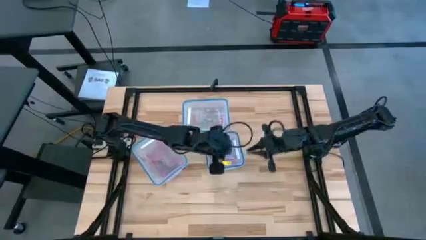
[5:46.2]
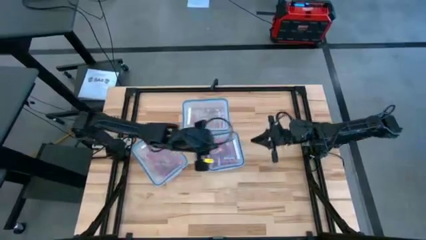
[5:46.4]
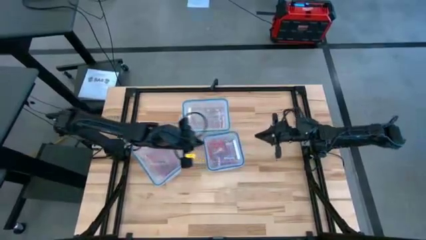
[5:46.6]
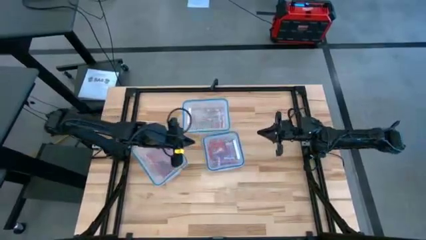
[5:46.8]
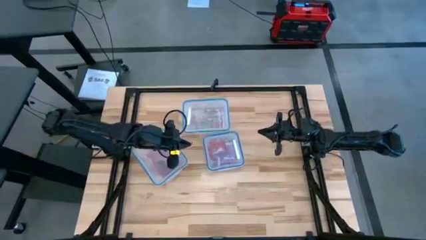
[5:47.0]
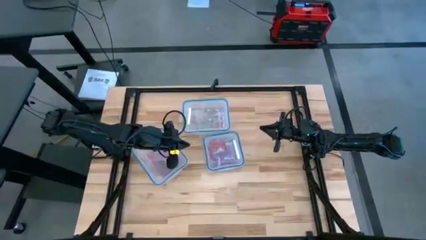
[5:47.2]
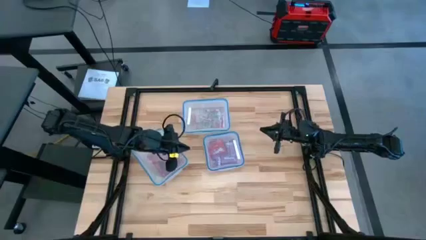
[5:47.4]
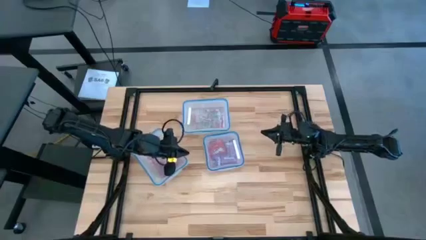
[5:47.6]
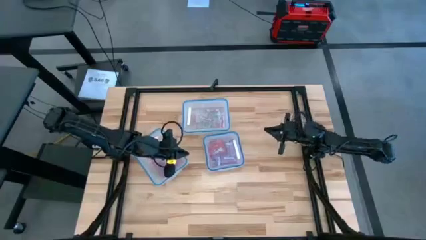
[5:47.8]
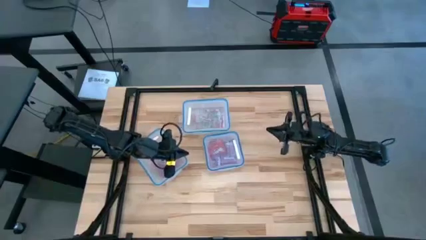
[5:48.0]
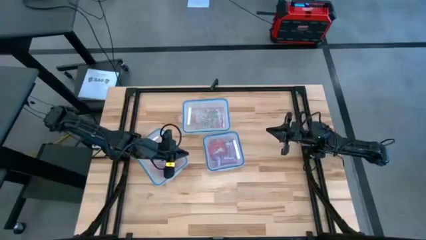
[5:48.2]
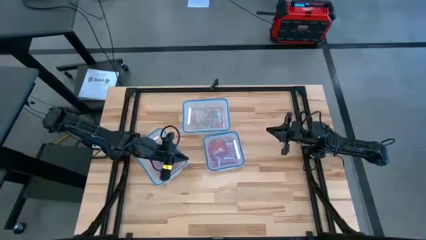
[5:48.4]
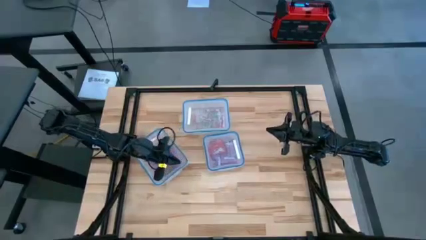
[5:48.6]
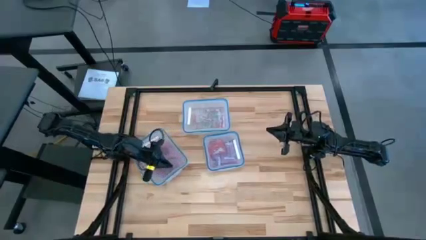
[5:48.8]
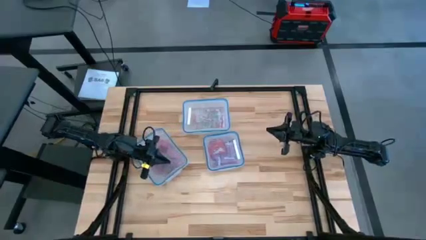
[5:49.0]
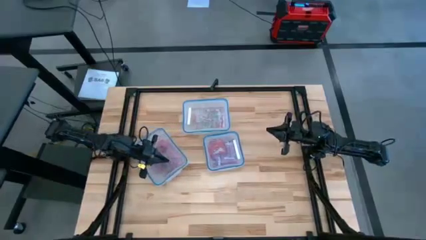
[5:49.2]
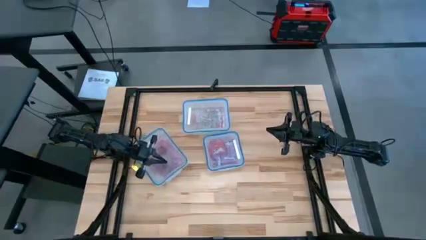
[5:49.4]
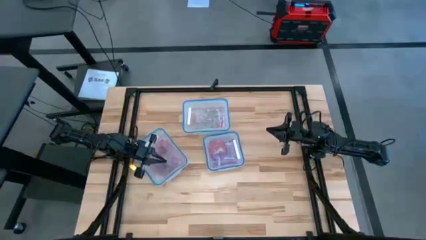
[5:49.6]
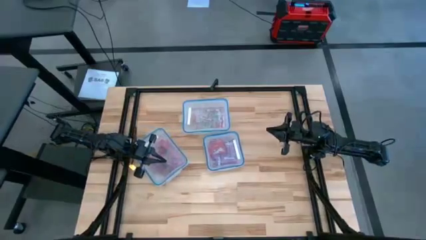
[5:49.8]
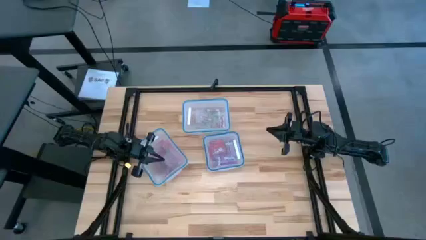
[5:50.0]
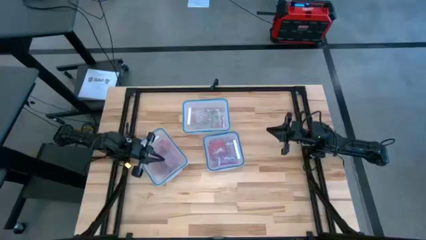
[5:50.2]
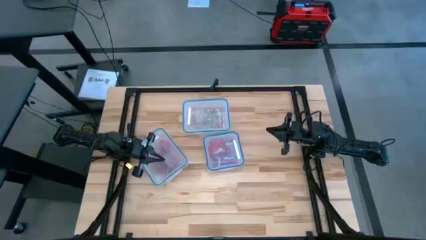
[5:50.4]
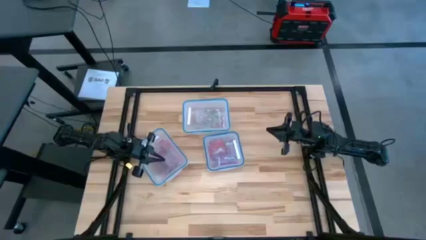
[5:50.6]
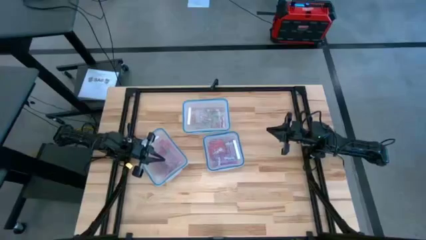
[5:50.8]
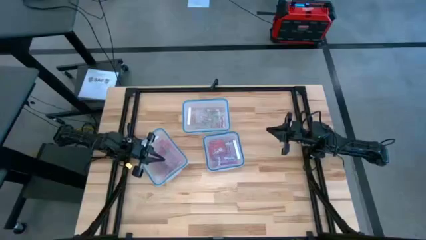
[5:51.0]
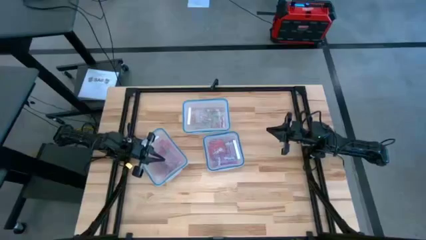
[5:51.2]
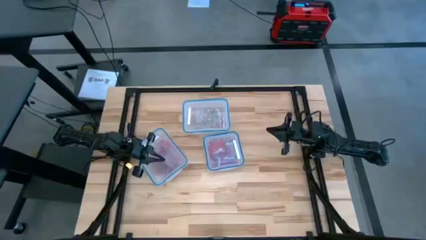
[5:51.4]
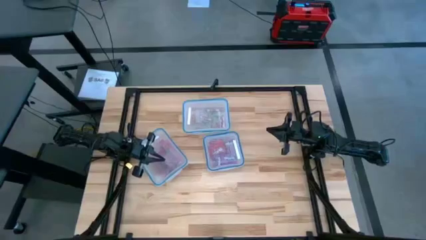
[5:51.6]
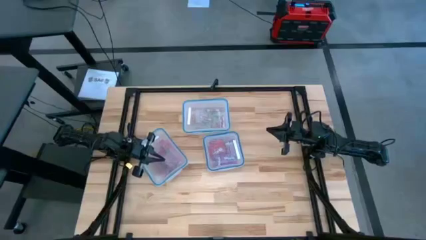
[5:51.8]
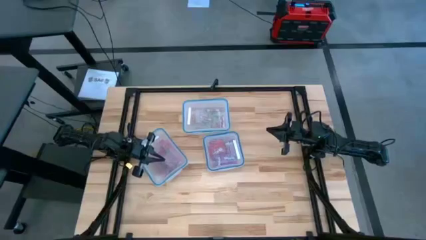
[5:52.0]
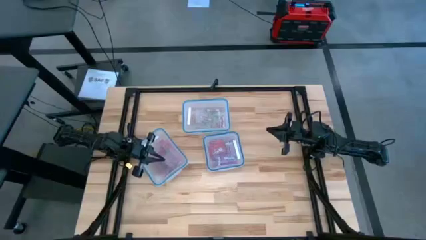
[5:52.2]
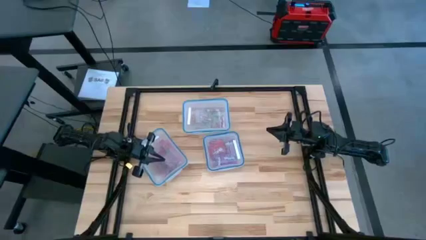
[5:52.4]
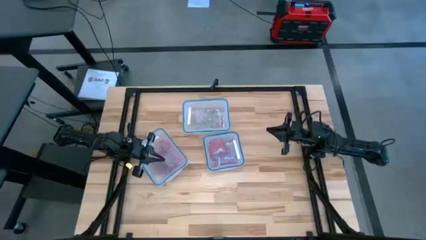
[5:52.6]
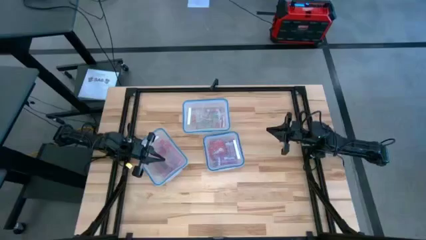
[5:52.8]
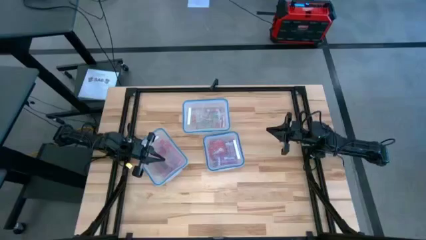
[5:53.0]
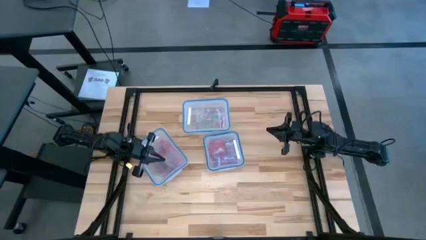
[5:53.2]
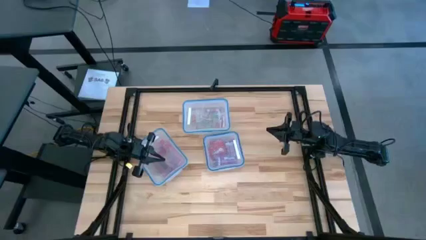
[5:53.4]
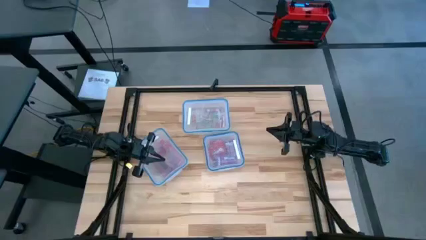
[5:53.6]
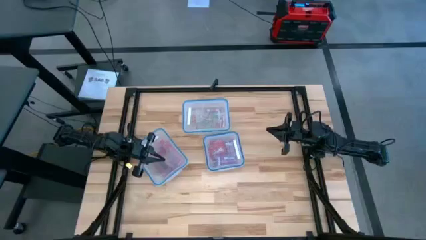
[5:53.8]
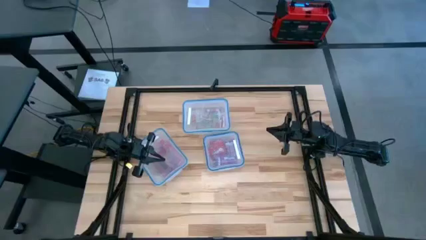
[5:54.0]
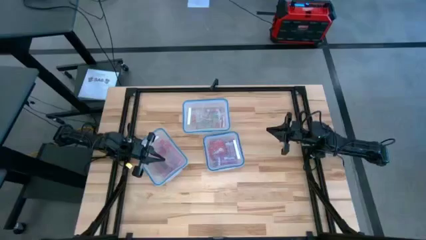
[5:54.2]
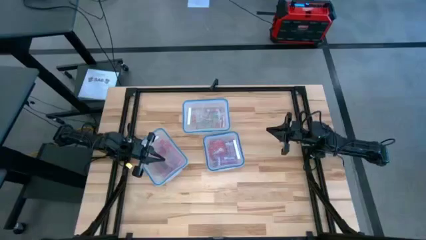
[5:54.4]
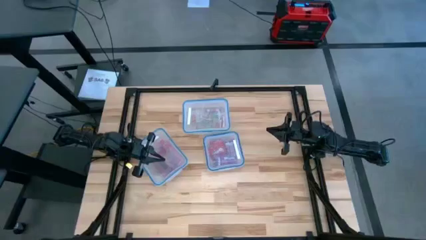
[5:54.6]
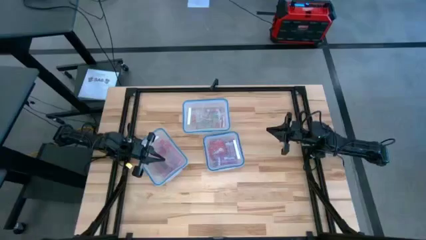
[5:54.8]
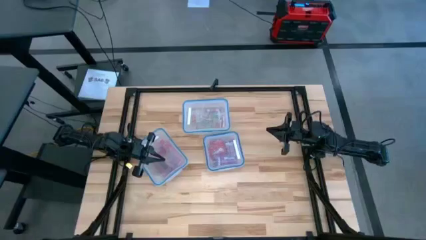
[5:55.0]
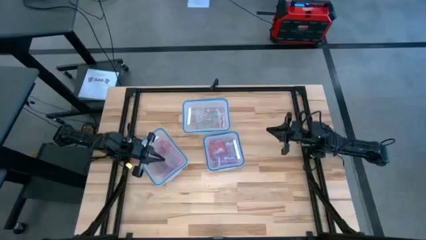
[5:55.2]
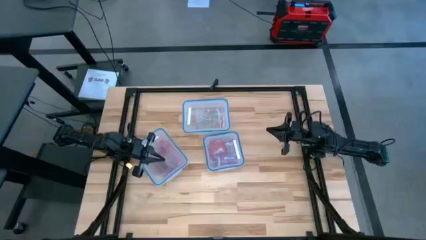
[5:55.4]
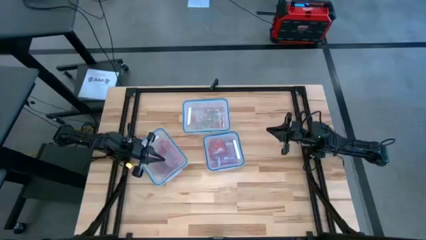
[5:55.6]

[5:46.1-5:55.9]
Task: Sort candy
Return to Home Position
